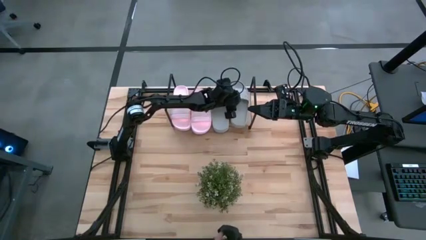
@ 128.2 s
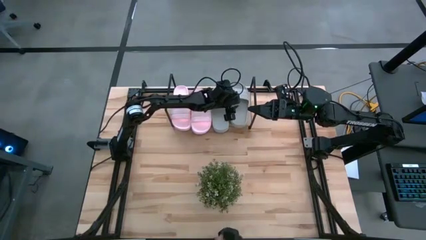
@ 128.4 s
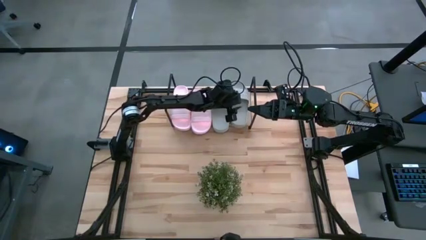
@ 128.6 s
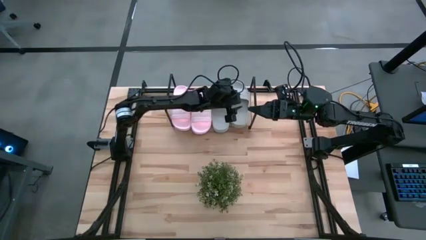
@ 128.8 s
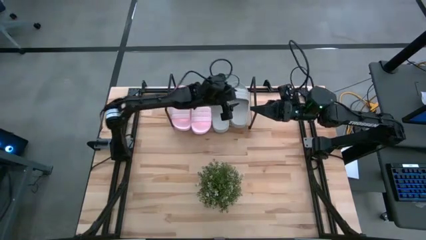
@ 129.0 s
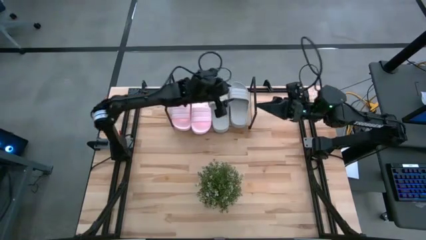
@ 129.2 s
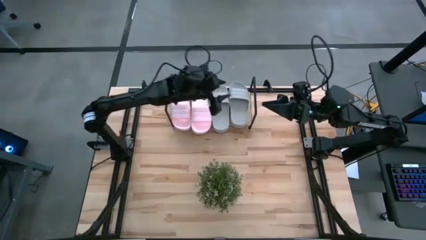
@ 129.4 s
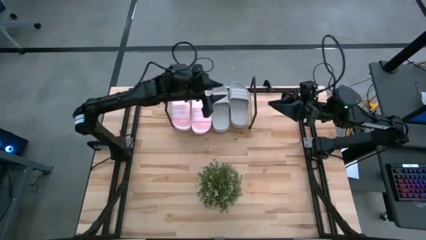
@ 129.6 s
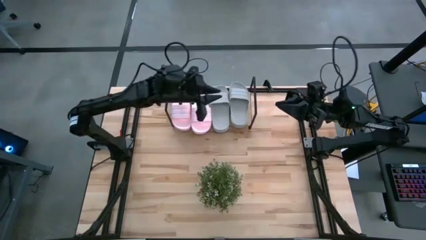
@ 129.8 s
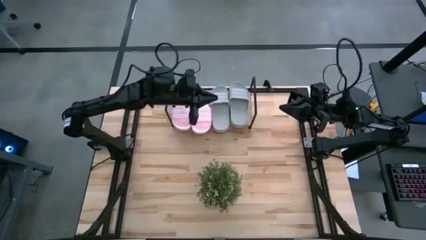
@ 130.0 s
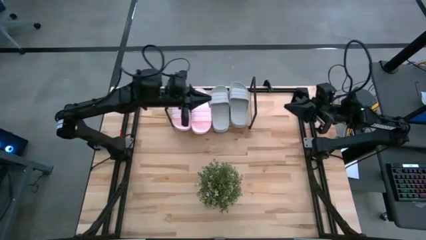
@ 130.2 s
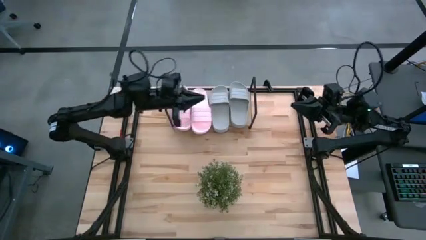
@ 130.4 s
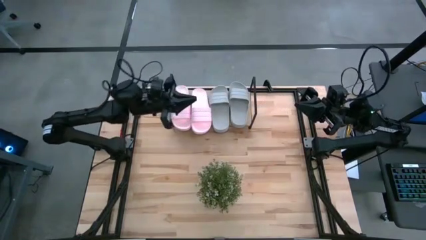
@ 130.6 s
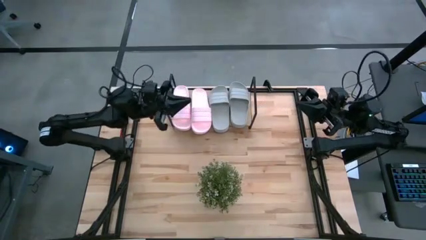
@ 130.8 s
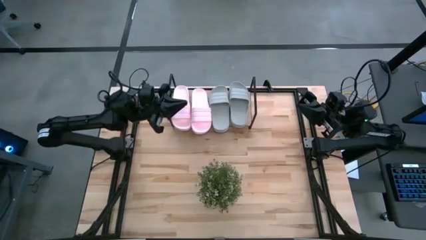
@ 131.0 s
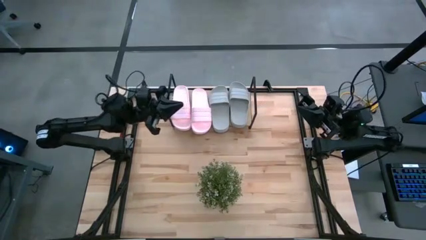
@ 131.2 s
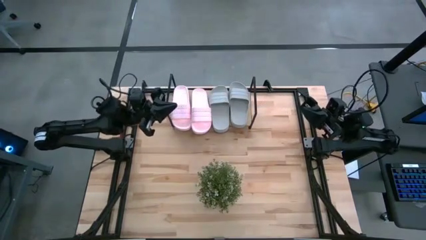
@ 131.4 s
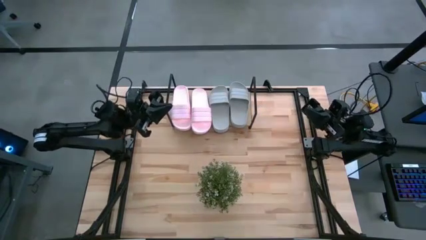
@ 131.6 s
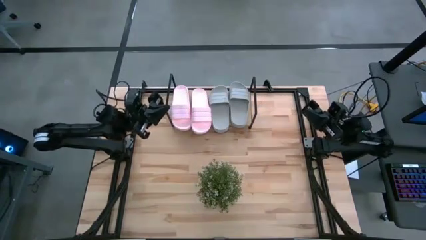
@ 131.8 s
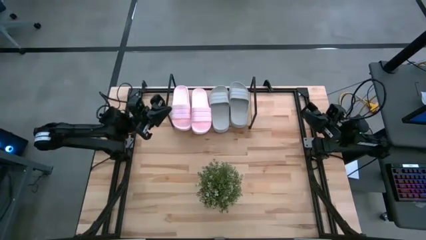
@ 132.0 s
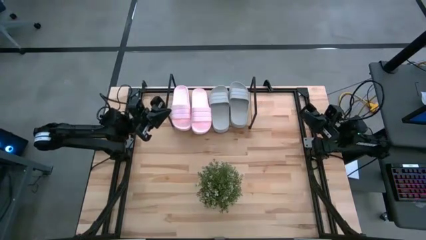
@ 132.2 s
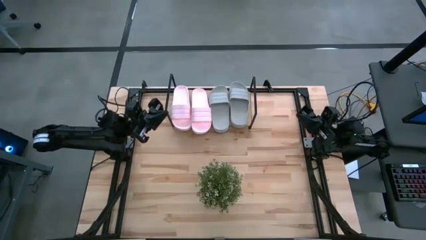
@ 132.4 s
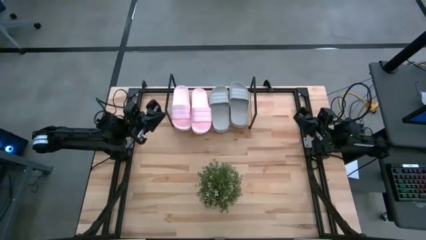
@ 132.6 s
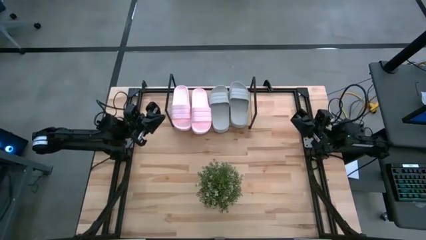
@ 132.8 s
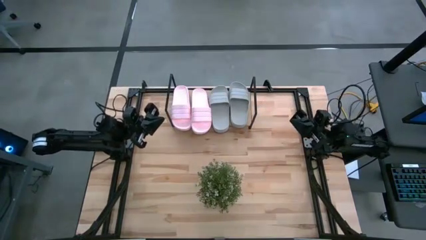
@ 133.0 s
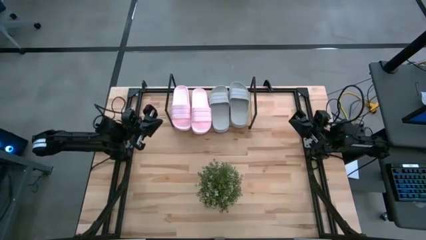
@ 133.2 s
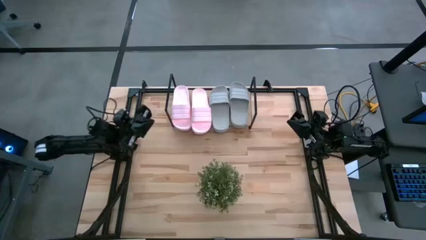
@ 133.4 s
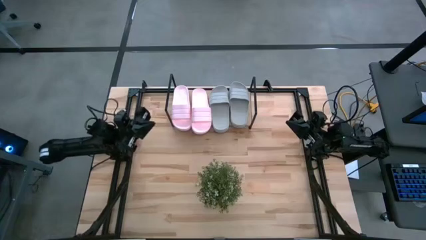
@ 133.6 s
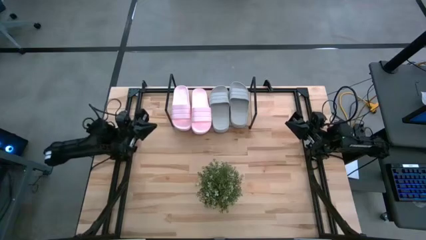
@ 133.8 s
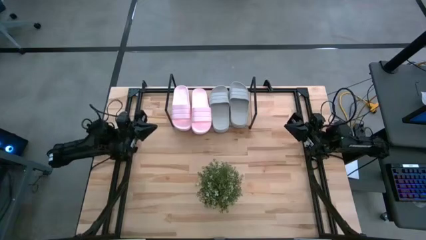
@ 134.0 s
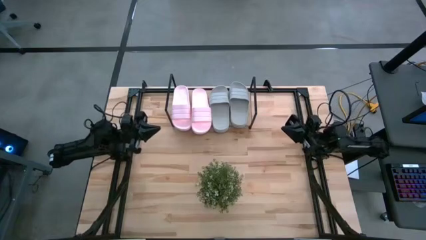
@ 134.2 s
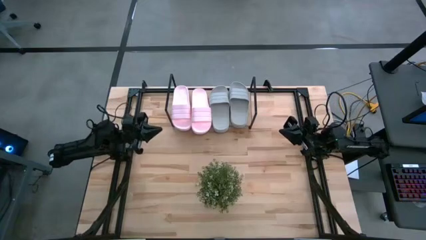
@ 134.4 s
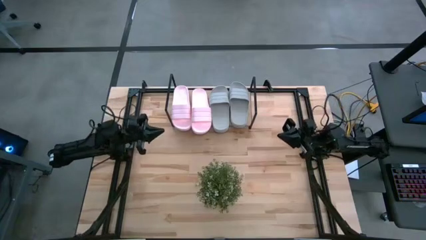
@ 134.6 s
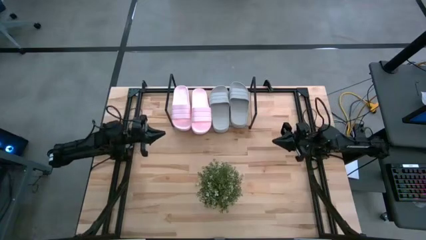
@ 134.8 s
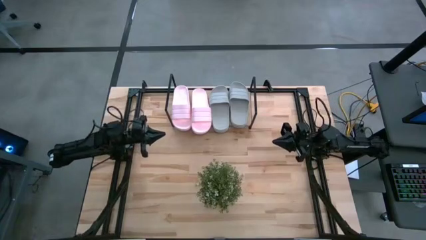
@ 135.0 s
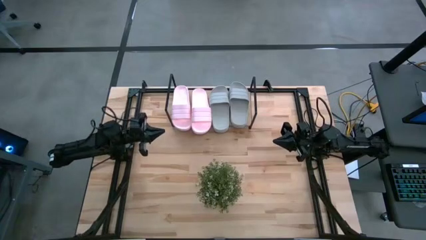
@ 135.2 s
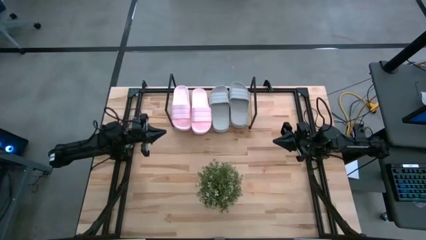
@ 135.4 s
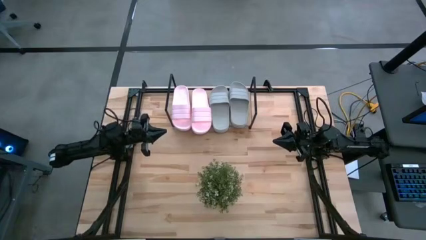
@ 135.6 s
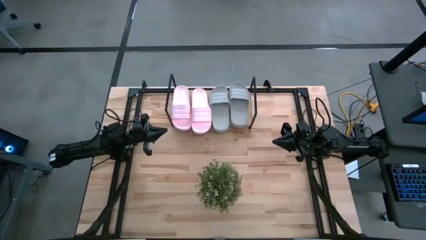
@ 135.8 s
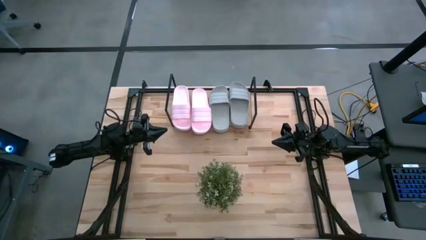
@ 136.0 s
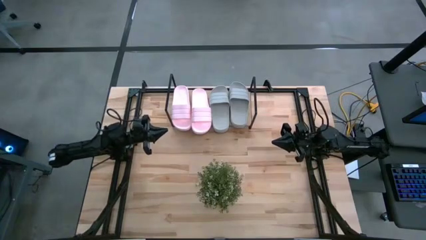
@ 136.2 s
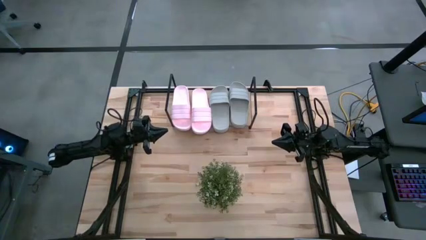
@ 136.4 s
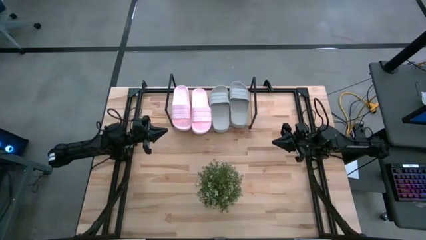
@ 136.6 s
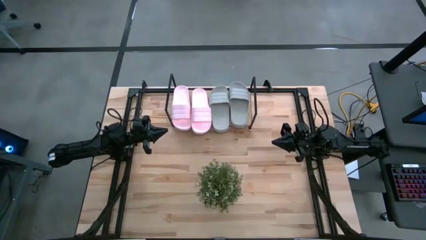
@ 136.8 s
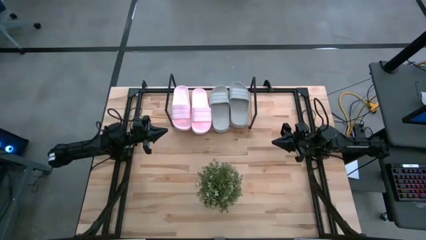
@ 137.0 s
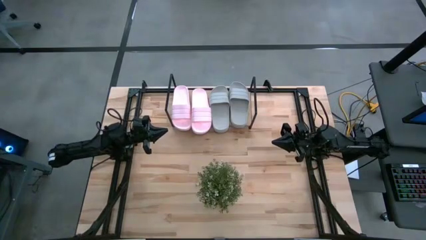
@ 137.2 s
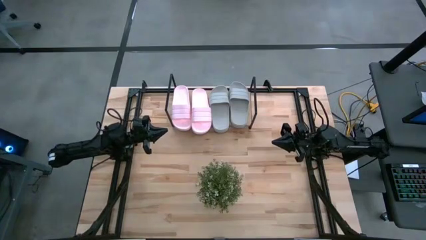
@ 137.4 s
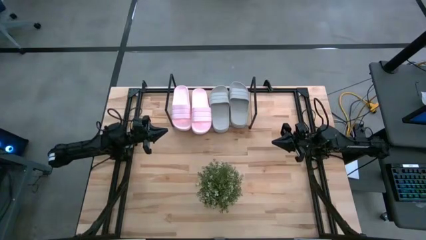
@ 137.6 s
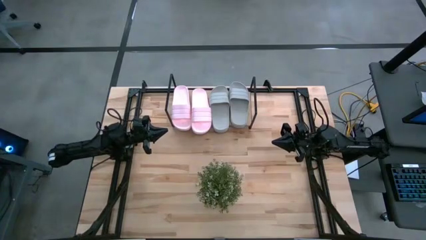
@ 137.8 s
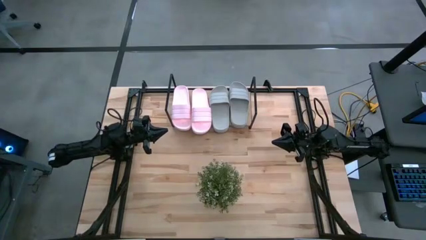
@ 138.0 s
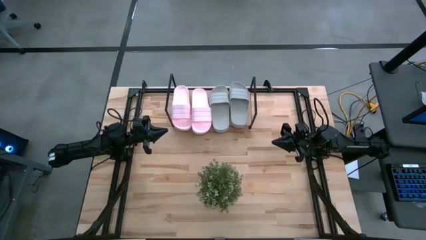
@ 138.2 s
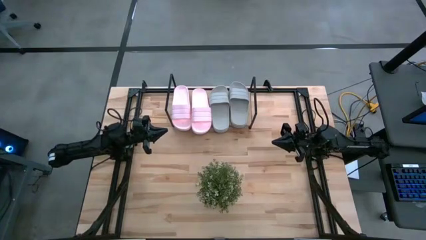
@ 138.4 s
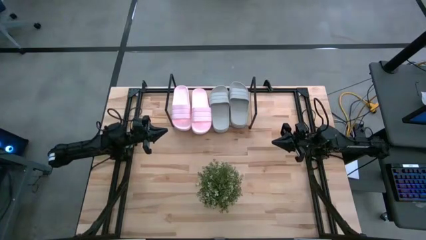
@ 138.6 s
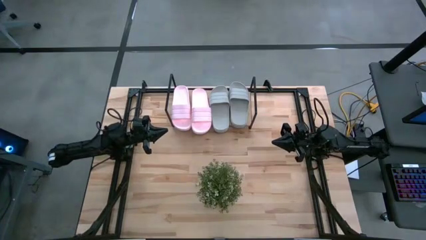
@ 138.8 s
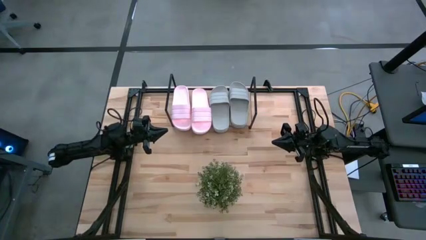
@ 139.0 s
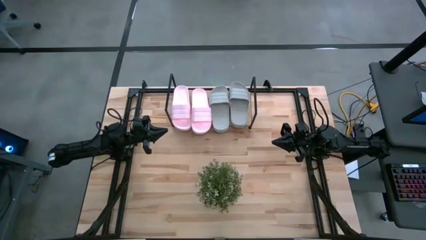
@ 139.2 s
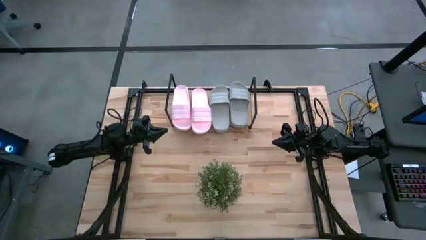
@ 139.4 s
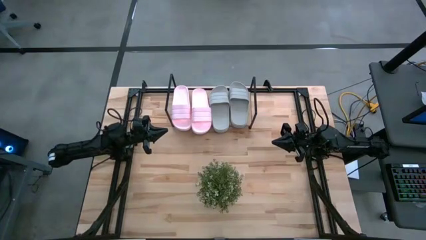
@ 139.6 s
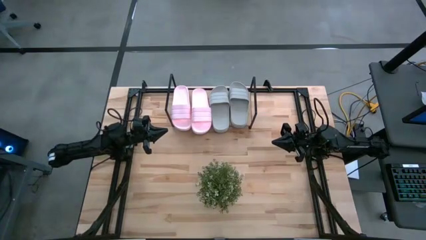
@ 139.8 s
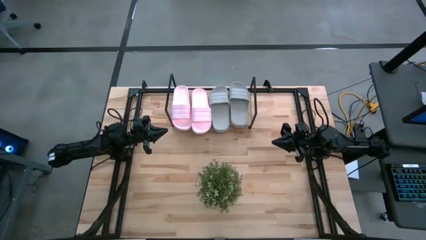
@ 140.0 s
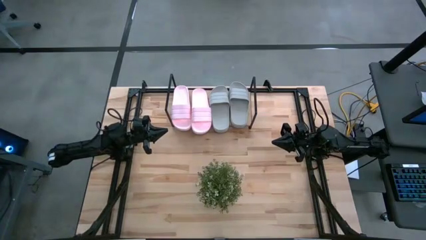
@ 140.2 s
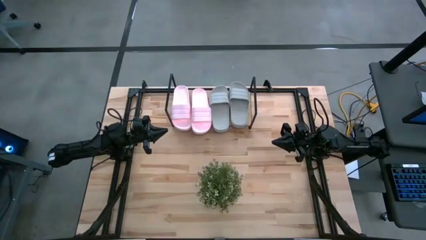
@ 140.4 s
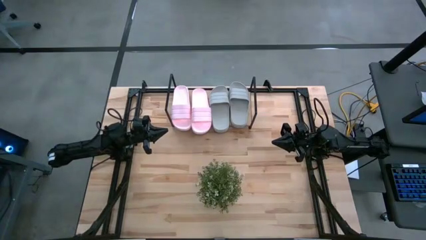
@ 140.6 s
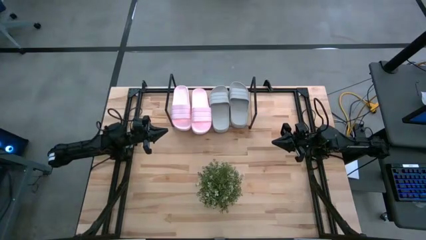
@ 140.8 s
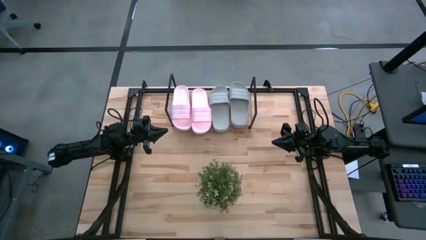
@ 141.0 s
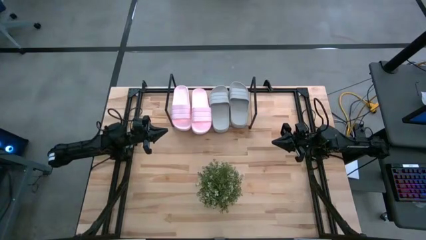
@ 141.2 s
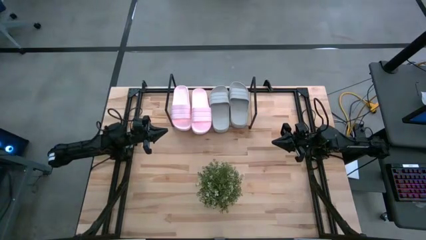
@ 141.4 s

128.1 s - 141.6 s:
Task: Pick and place slides into the shelf
Return to Home Position

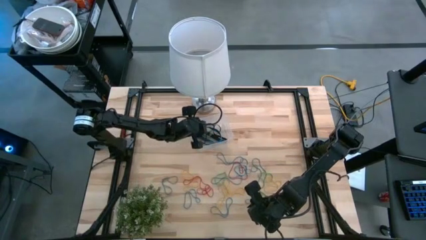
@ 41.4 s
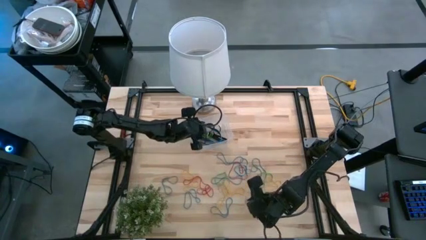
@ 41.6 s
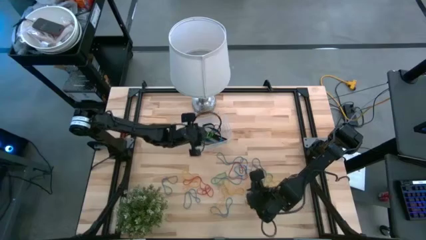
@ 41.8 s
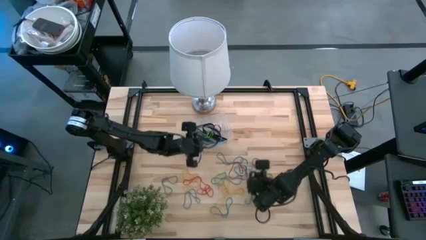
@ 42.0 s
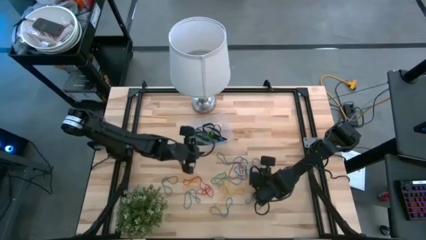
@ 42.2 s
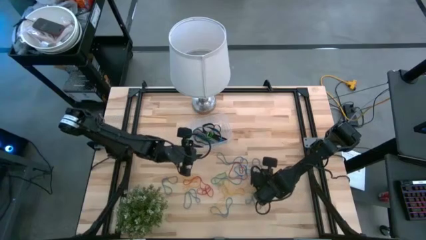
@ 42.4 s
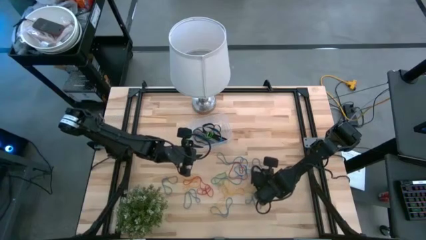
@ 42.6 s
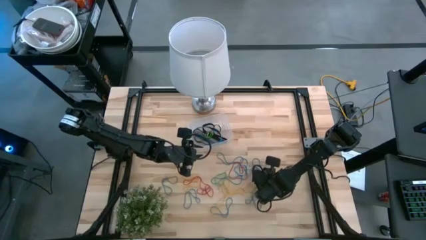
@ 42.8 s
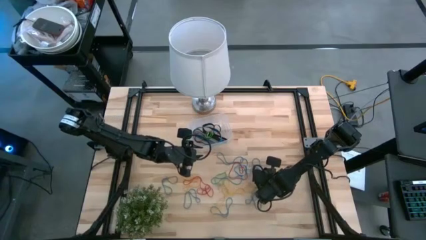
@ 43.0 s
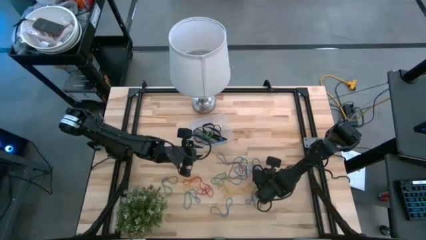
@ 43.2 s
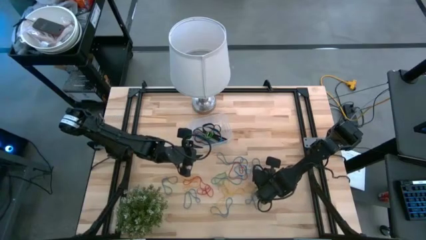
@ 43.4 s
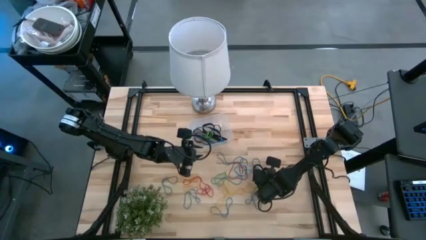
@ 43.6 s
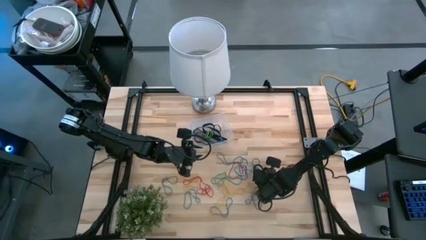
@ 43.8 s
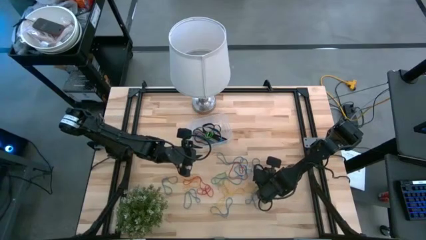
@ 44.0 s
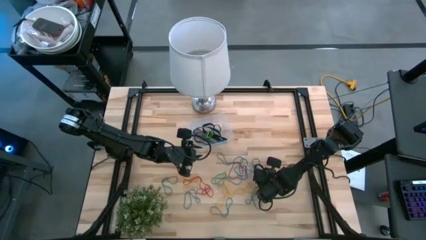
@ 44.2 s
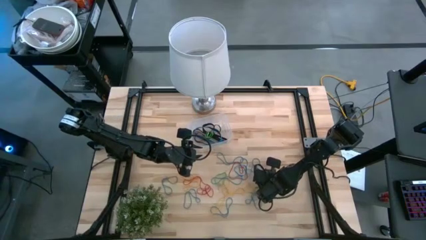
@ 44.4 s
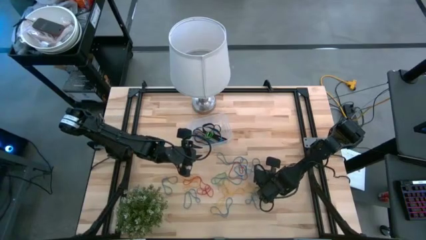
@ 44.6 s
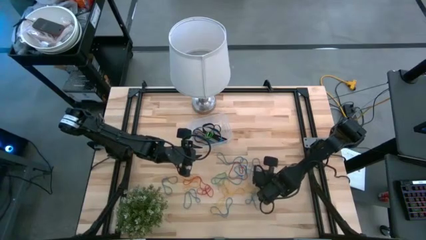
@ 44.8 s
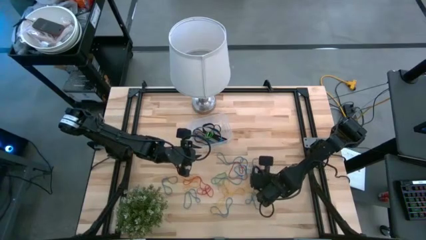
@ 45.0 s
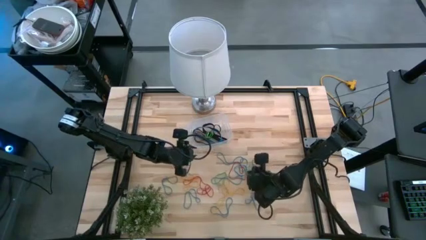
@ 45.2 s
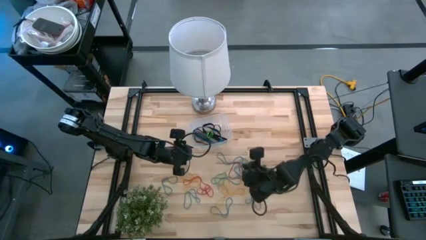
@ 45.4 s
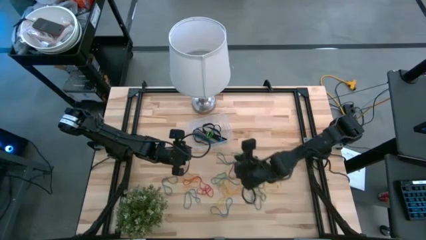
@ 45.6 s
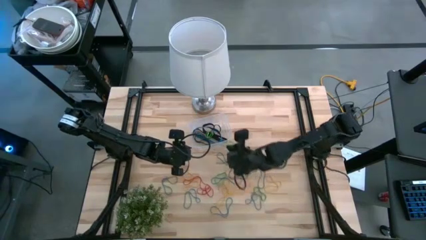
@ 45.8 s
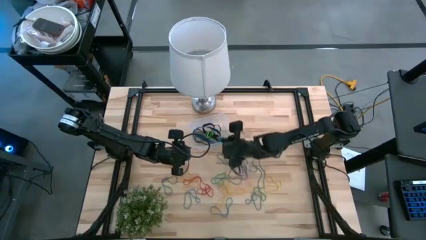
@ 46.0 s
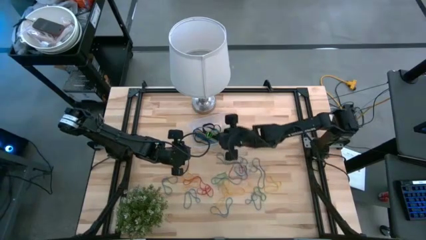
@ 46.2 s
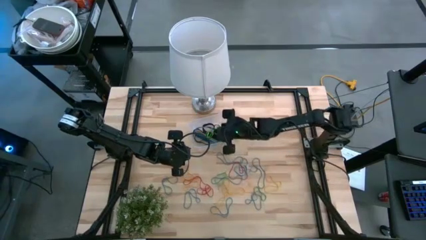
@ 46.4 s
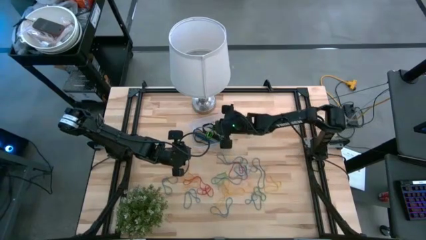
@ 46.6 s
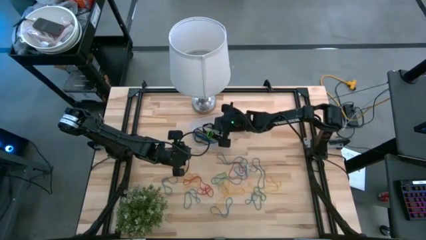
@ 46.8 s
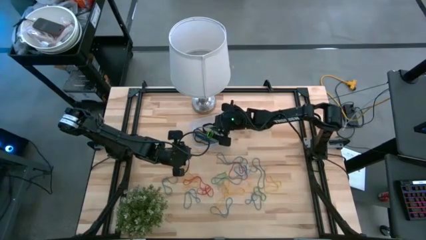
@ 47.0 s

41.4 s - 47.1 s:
Task: Pick and place rubber bands into bin
Put the green rubber band into the transparent container
